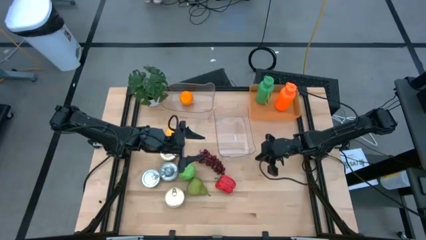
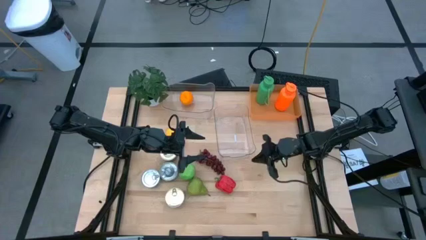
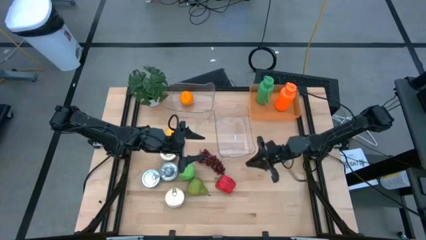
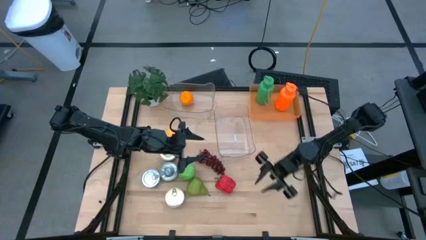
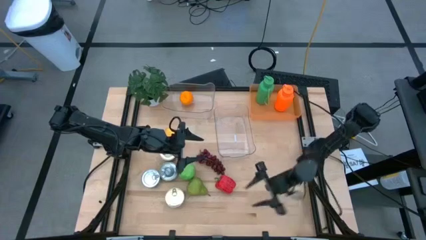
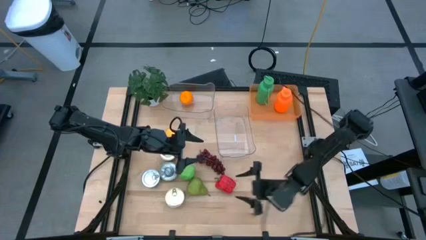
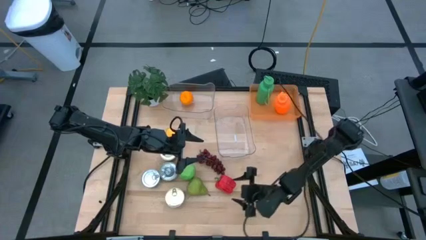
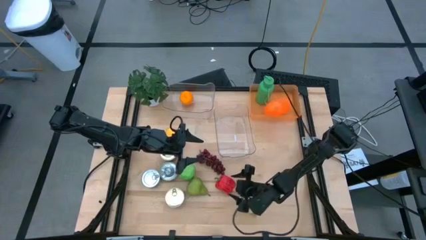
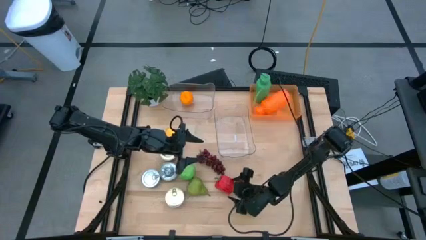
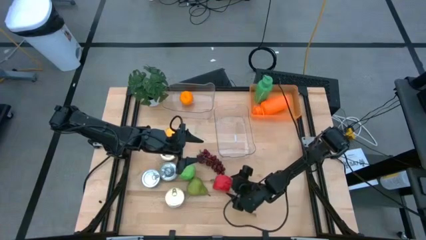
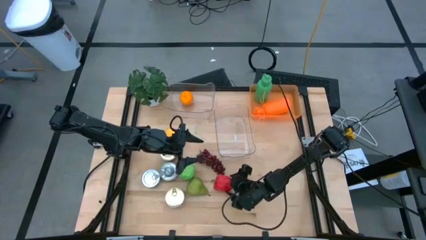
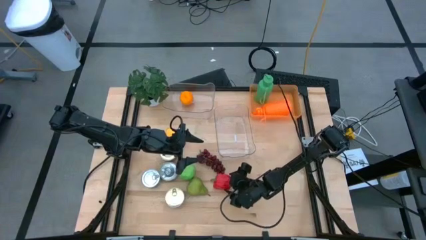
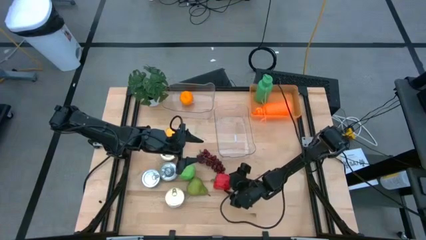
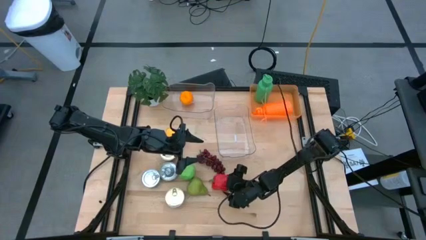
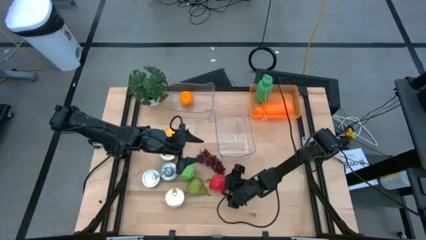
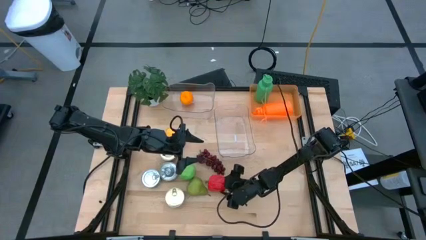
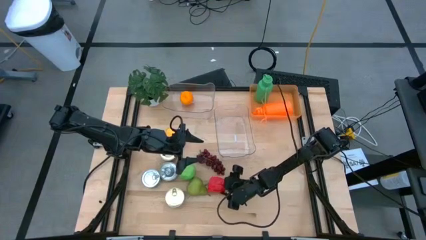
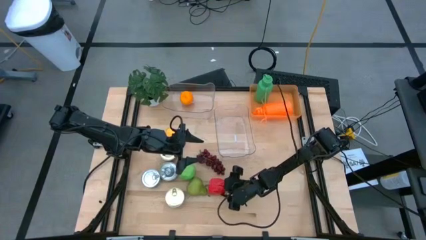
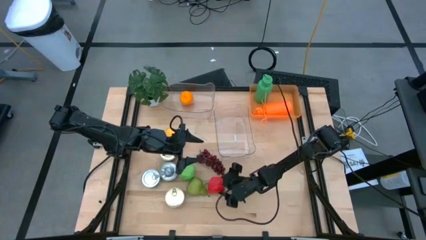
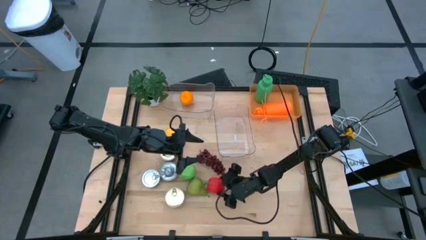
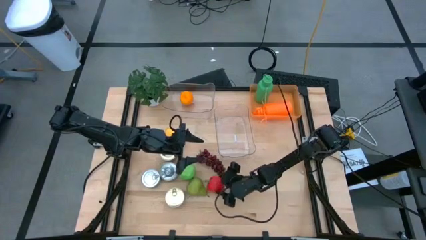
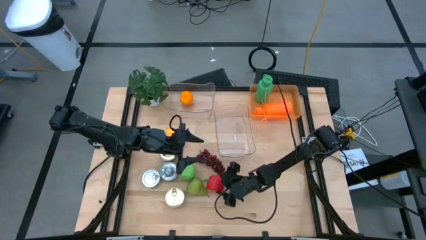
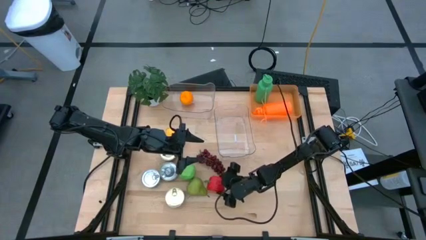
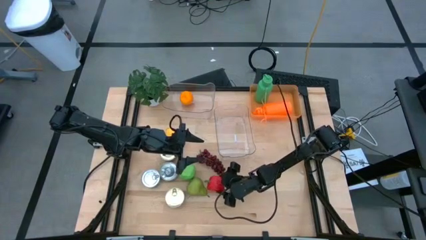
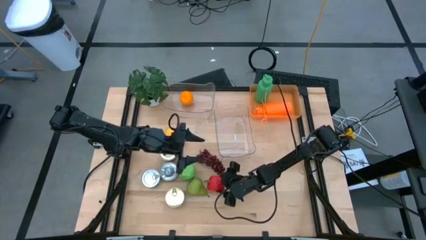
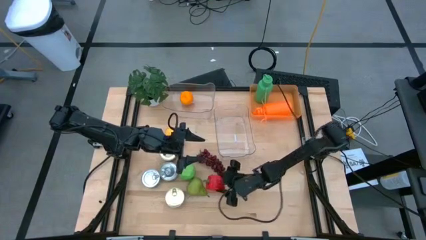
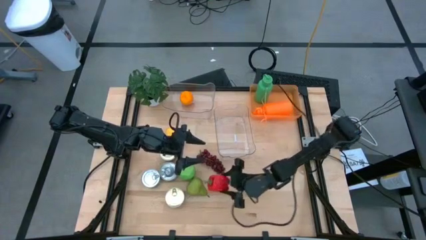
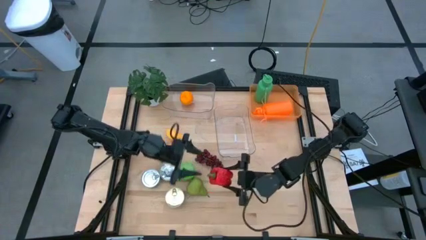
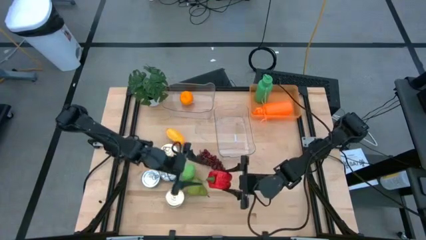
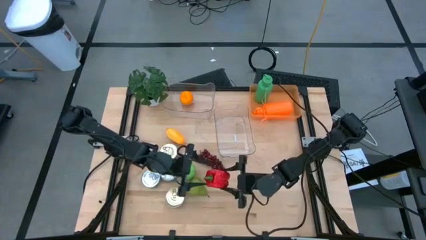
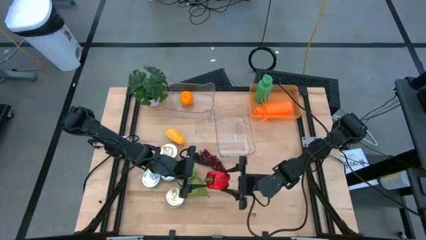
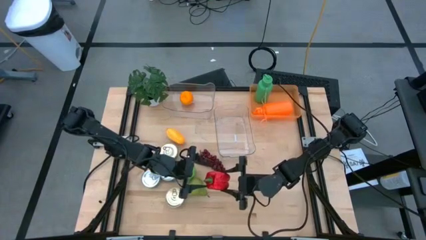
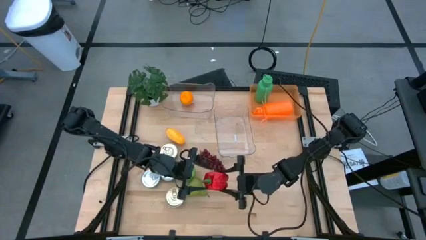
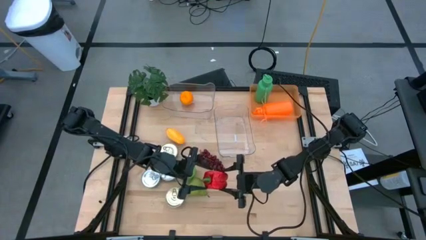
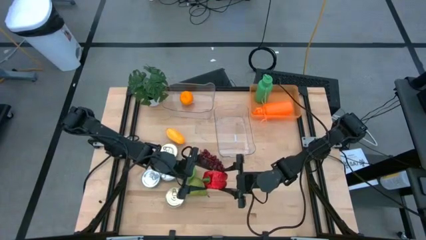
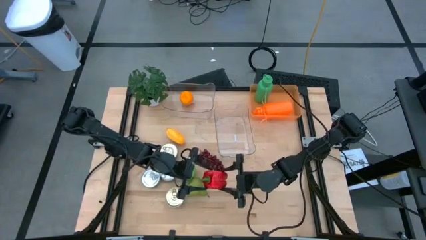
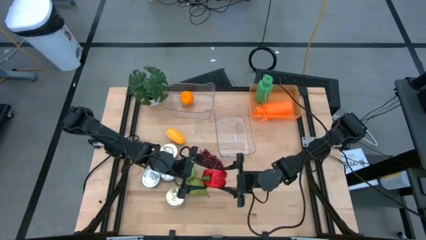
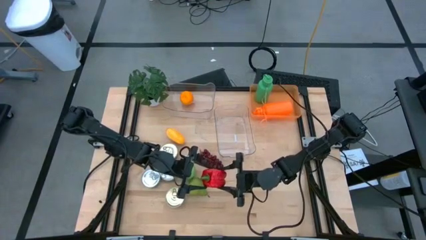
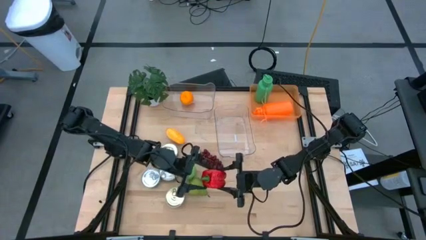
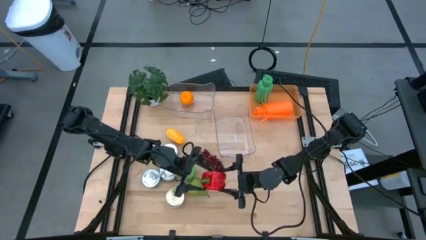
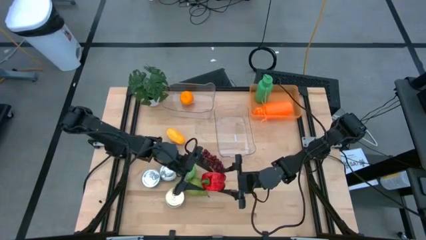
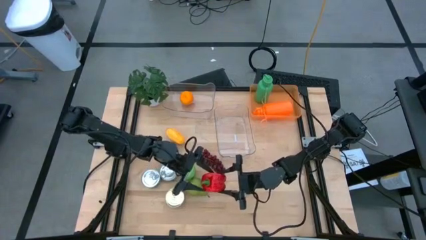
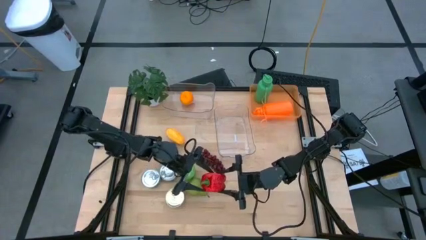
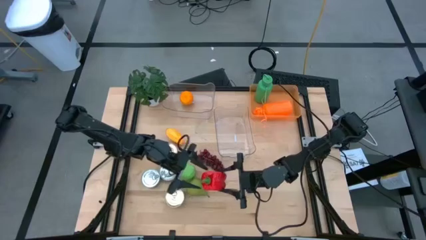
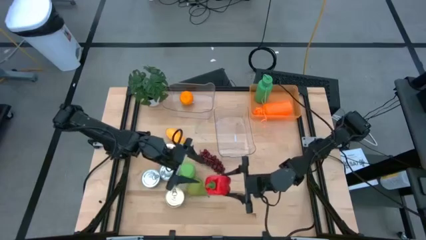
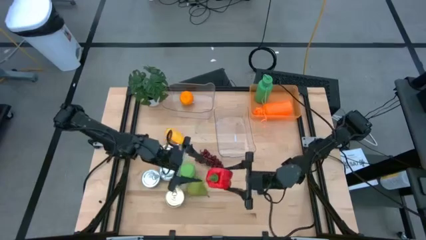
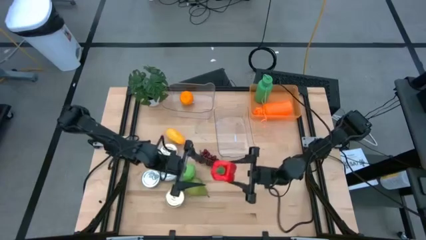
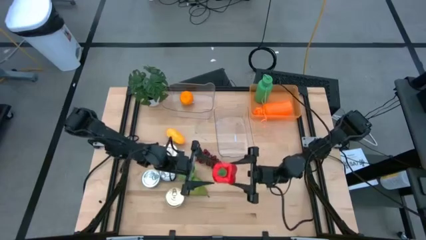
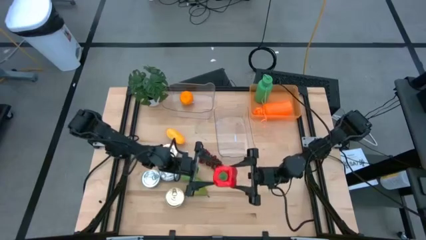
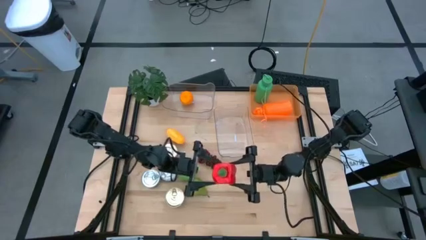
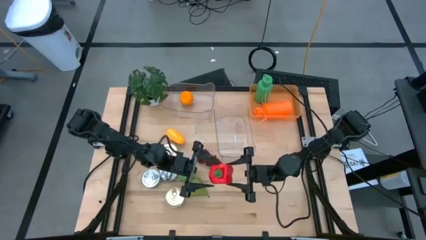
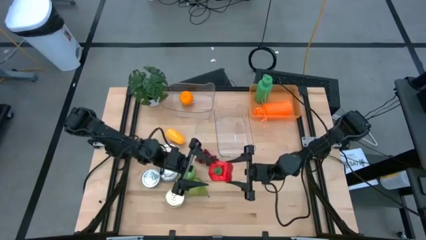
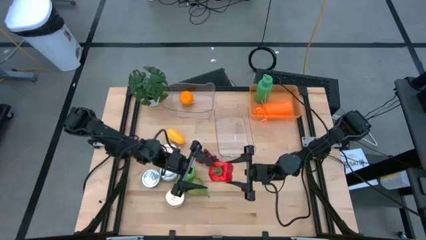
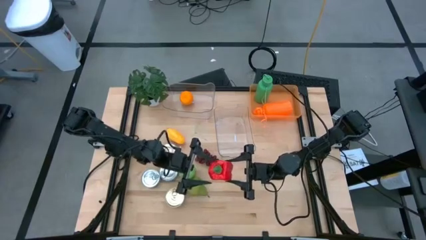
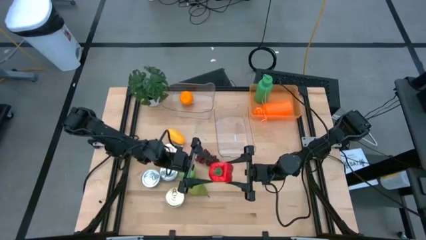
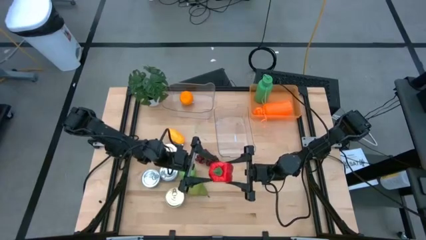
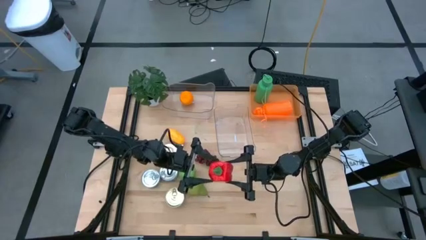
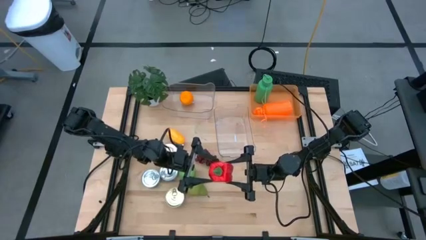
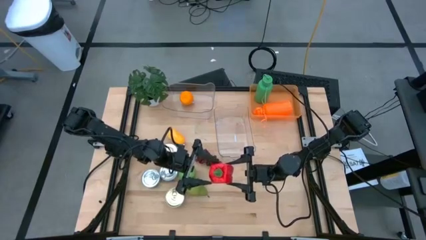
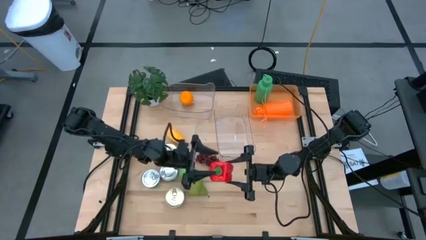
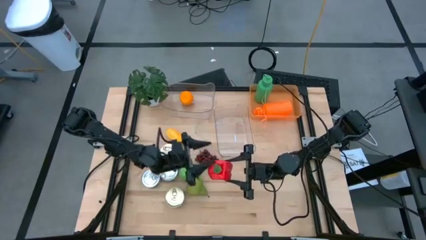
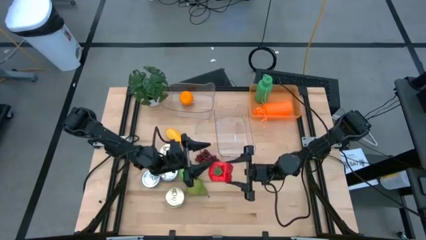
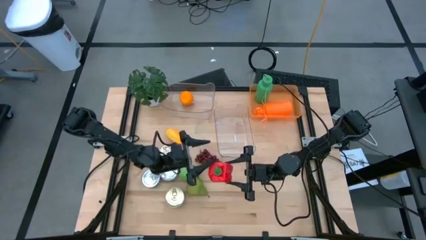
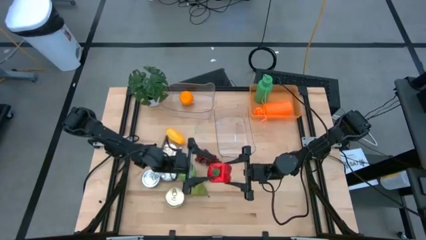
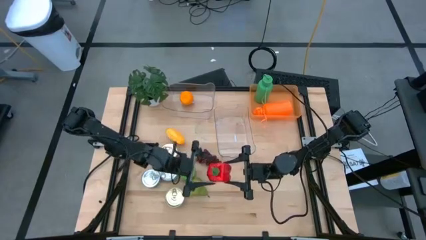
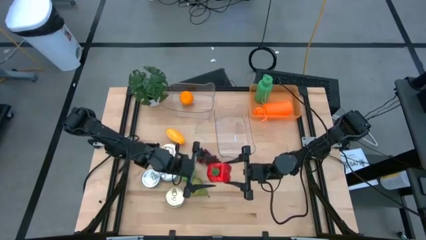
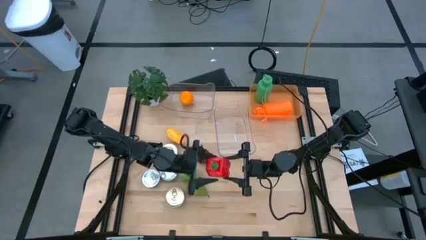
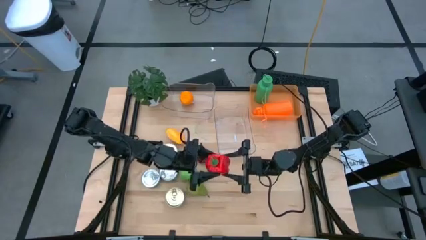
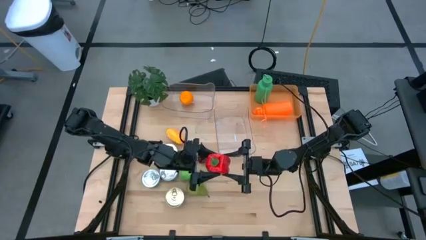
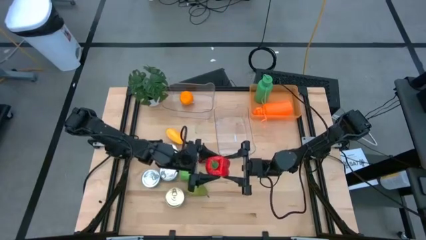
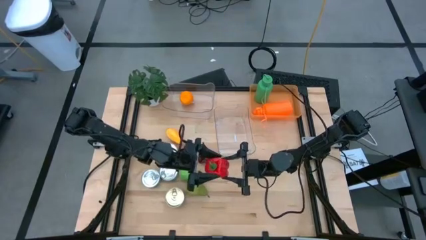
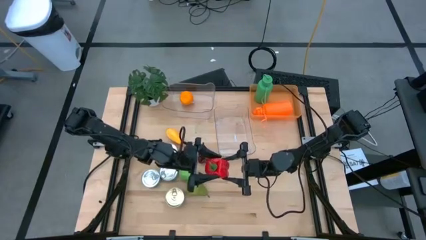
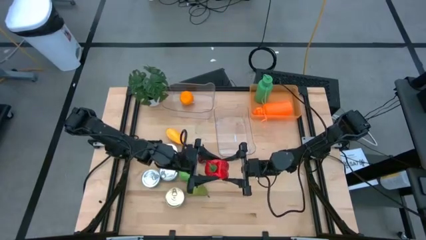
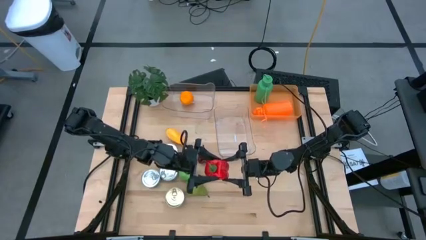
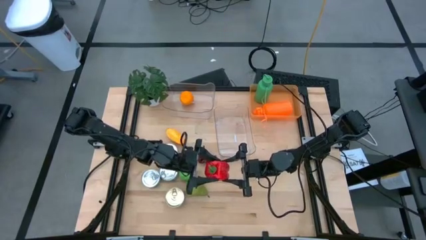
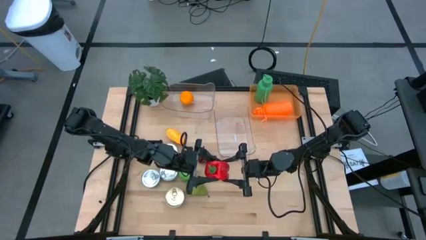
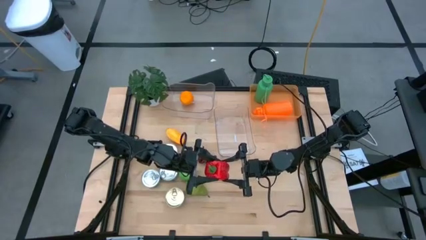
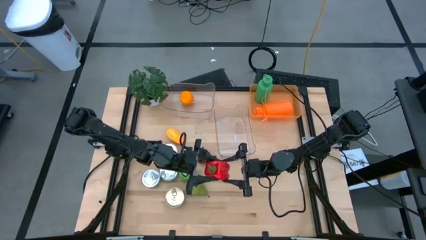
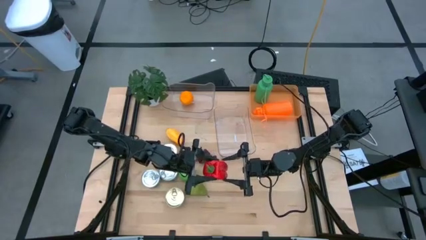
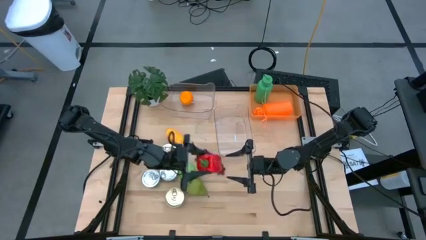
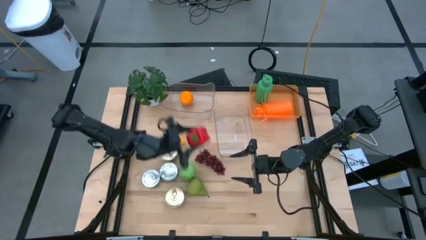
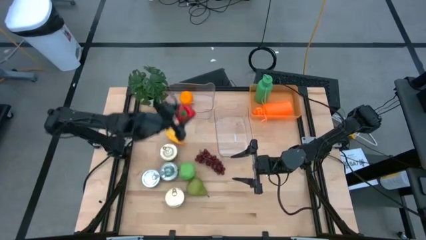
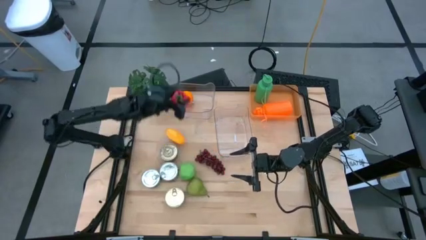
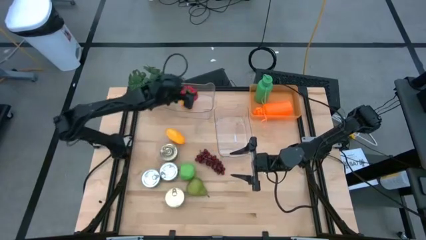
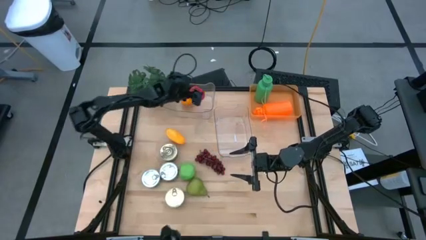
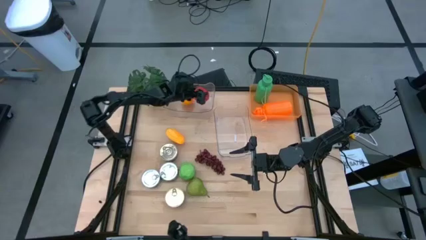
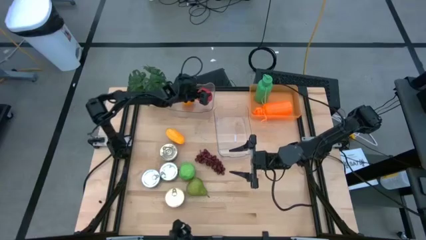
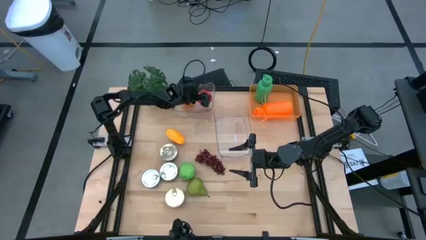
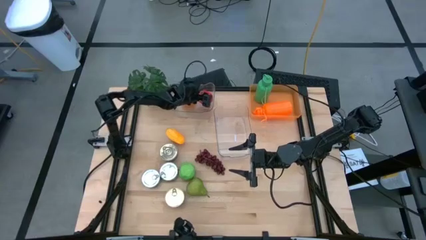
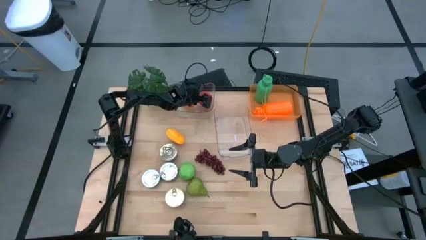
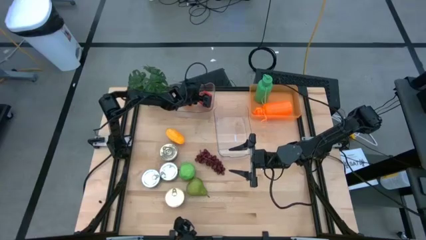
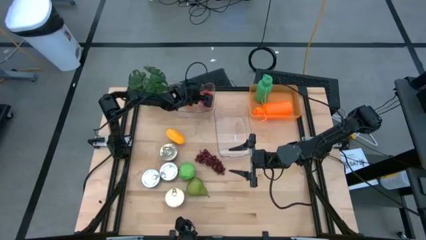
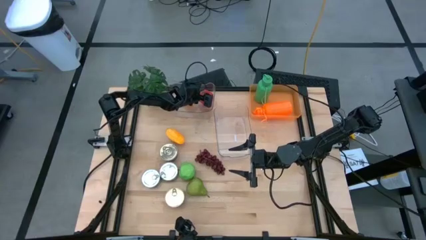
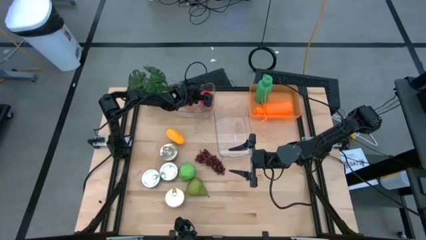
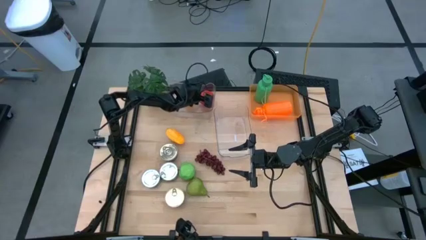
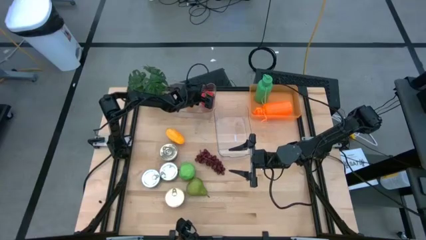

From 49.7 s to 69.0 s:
Task: Pick & Place Food Item
Put the red bell pepper into the top transparent bin
